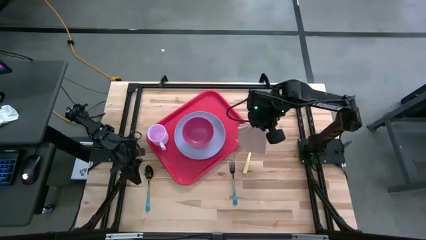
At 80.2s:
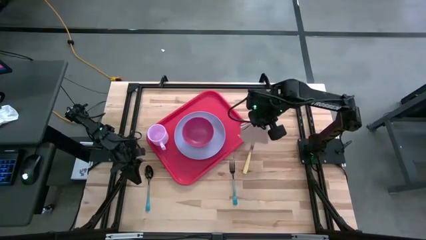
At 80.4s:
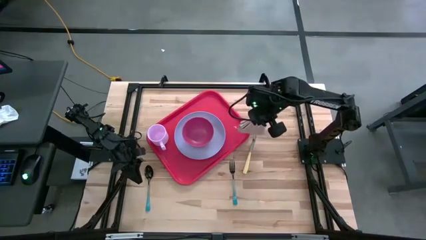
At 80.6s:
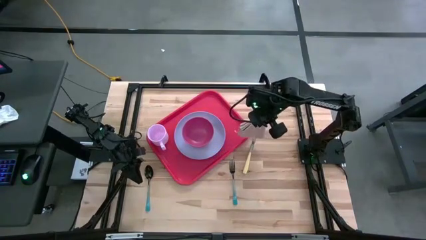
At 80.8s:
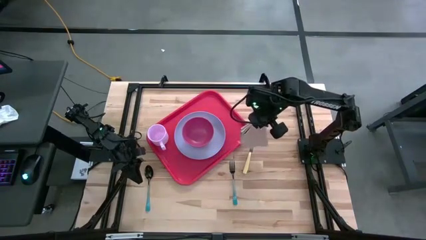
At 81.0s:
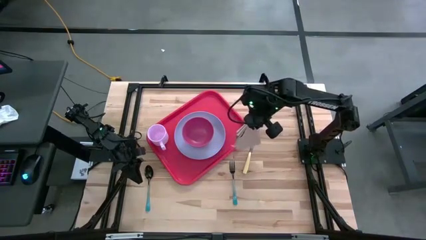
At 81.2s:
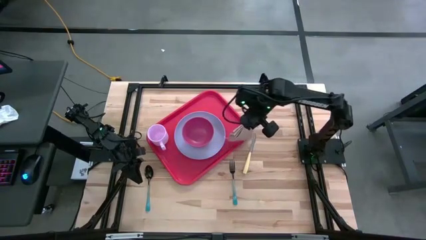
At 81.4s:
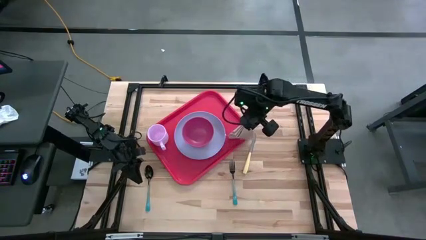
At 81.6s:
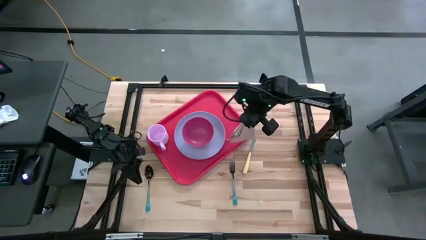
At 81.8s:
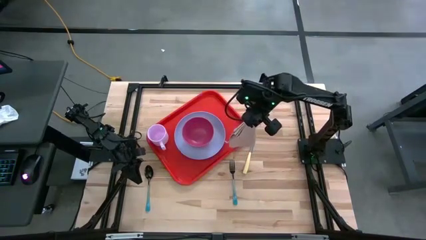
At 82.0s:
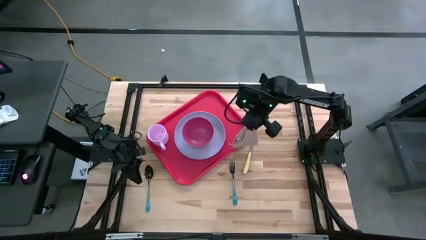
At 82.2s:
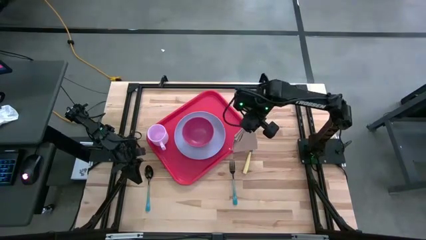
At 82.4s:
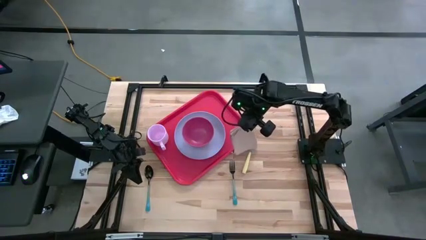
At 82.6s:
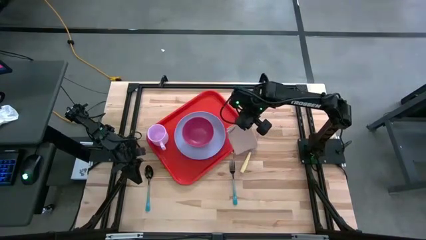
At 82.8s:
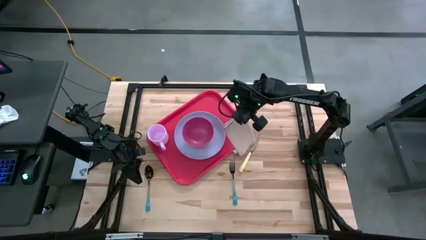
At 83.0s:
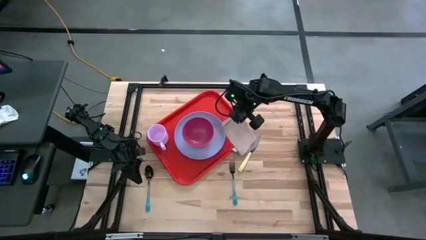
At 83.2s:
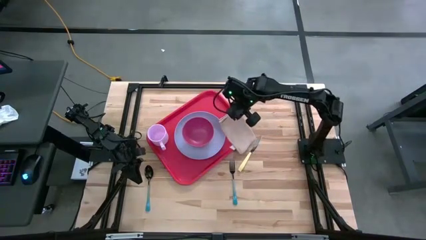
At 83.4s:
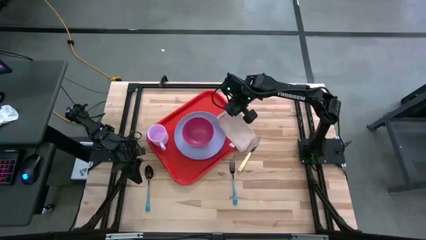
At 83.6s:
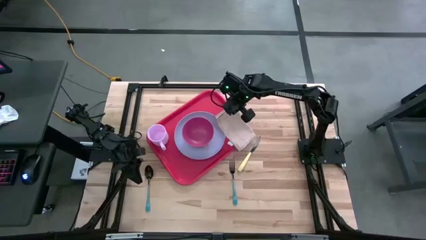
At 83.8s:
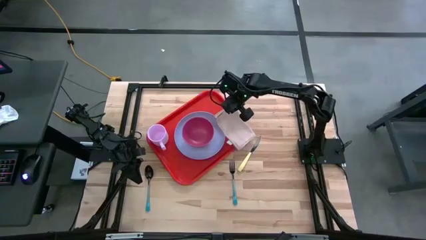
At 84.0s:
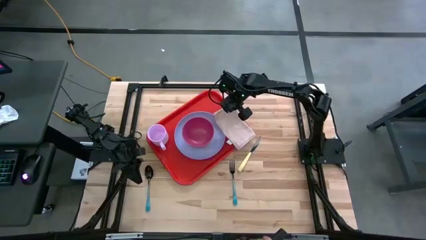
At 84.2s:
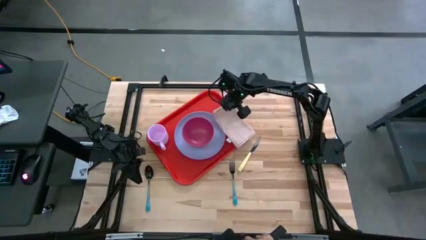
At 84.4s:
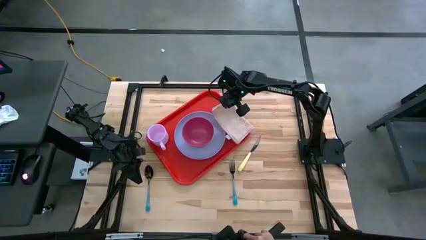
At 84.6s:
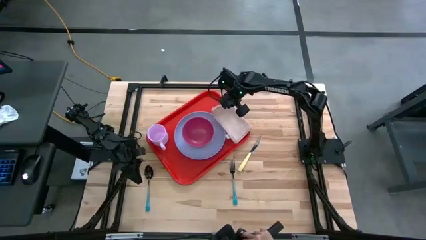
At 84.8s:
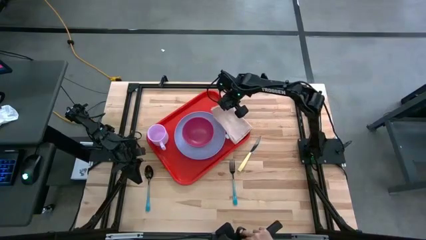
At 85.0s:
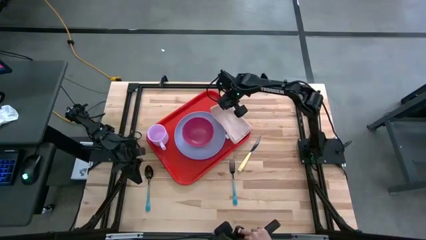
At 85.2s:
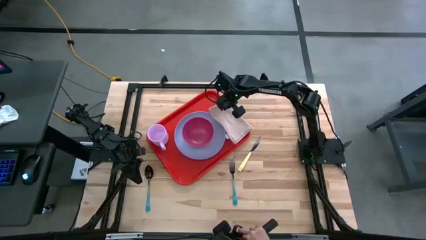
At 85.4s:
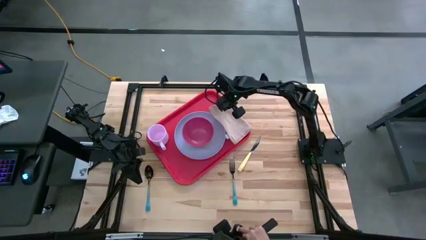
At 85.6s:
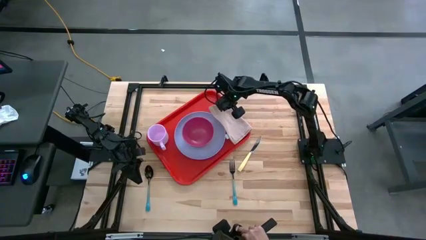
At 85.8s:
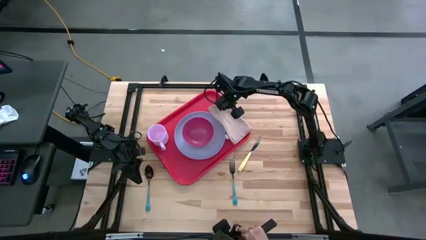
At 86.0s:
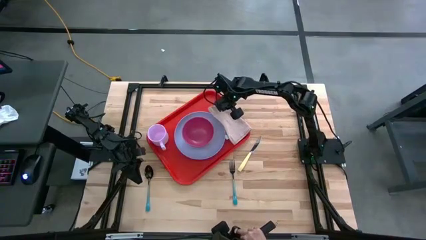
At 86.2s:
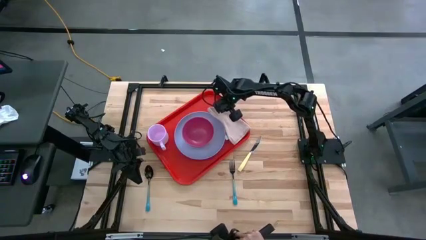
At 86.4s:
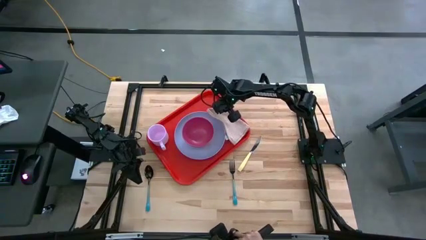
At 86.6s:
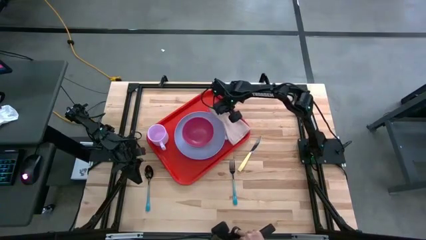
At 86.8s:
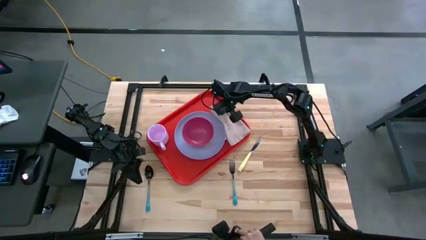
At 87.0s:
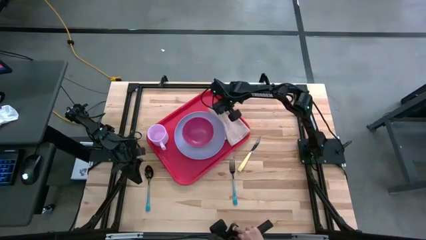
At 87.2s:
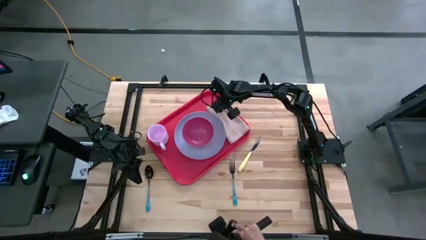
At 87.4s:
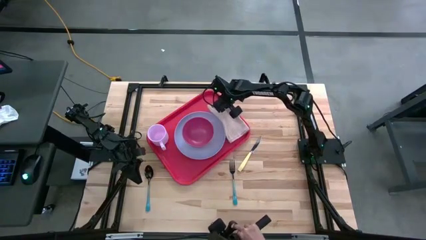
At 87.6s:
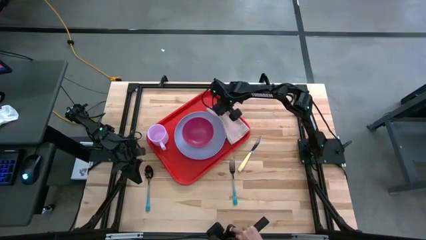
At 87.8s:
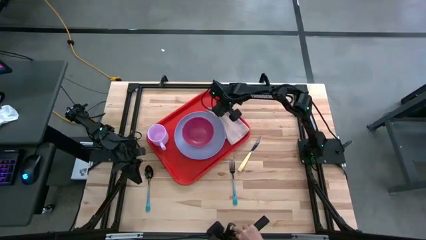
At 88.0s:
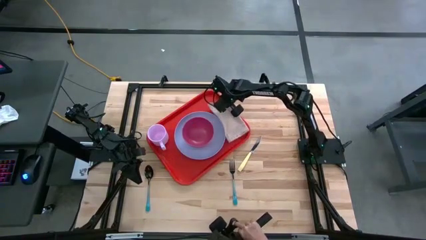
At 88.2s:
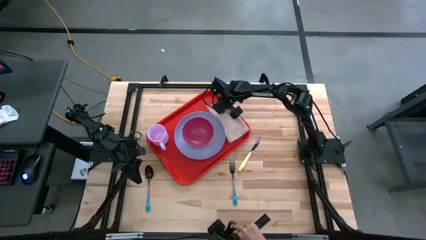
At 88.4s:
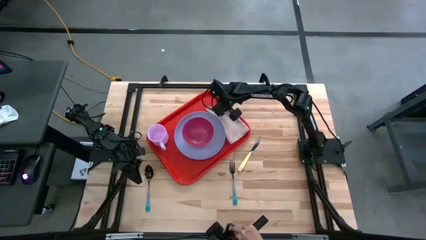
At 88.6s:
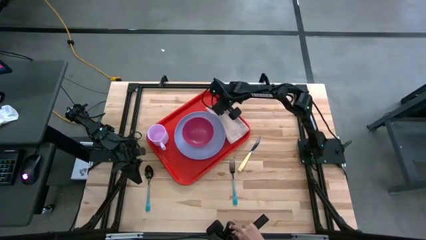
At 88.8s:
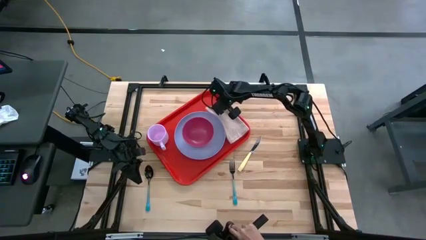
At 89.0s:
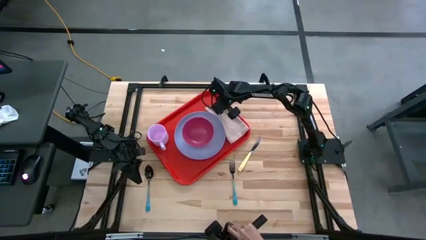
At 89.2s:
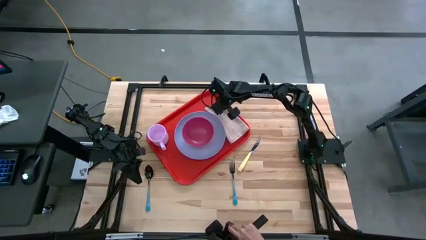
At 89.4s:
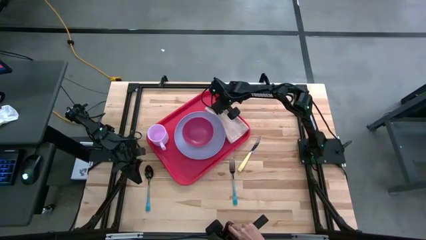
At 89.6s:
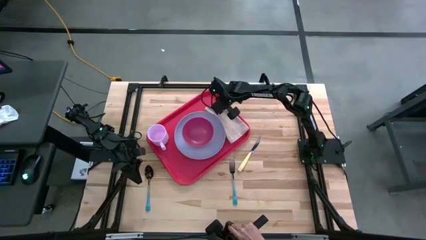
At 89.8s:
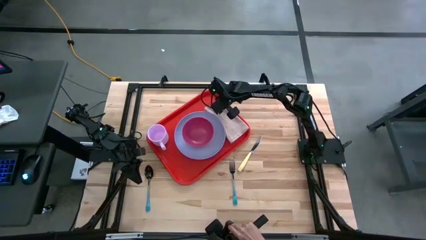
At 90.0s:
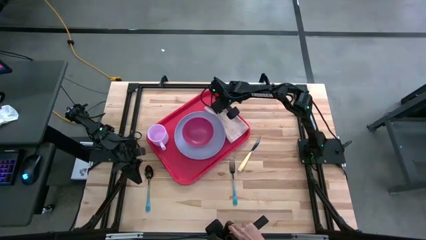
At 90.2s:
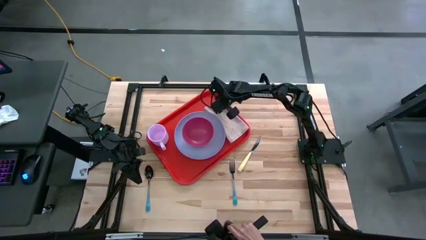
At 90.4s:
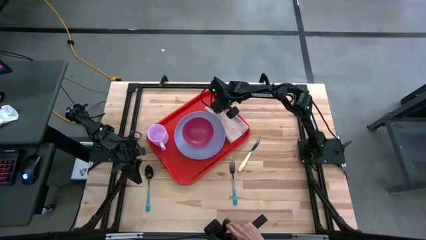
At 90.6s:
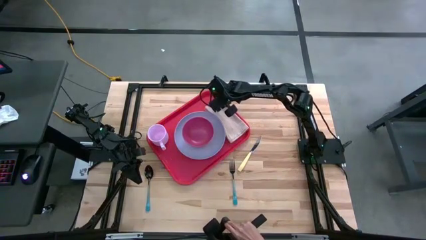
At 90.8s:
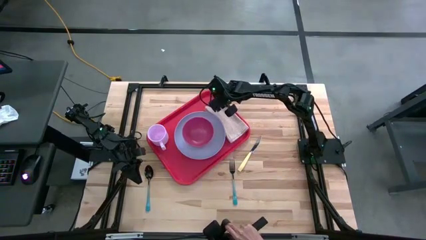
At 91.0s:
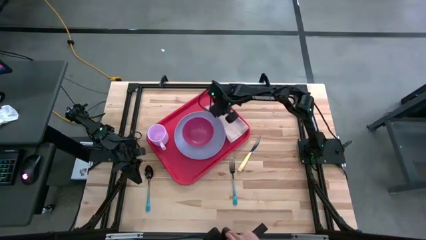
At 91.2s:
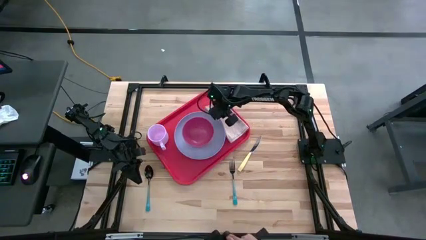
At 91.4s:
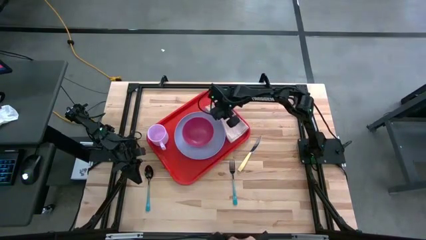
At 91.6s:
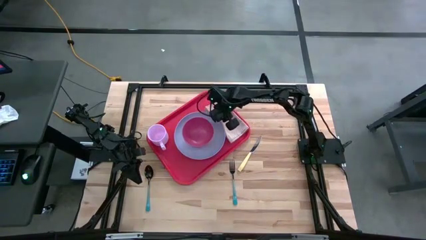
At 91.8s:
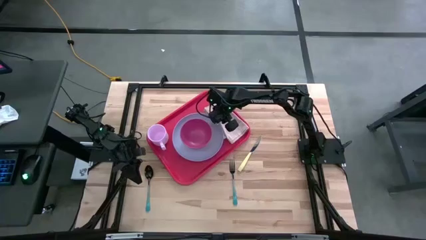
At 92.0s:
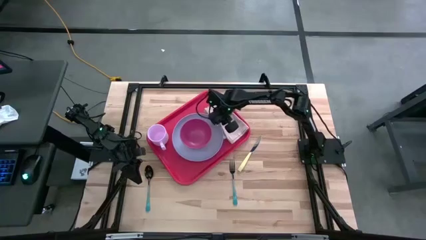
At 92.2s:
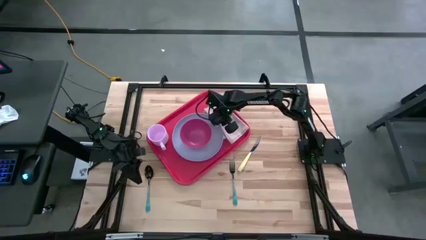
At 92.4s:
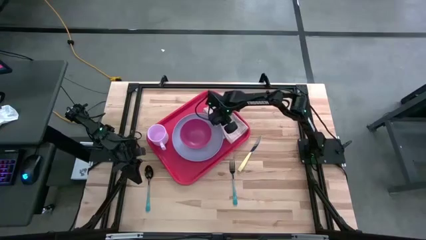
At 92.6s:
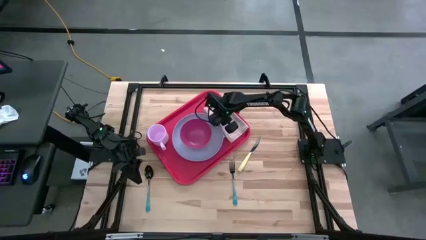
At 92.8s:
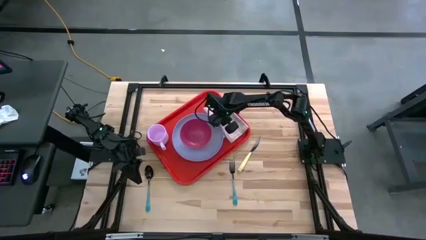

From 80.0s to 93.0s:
Task: Set up tray
Put the brown table napkin to the right of the white plate on the red serving tray

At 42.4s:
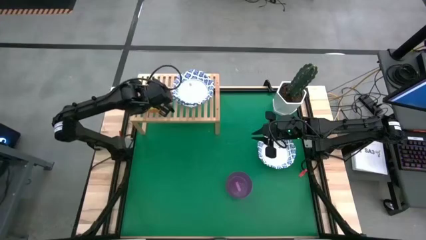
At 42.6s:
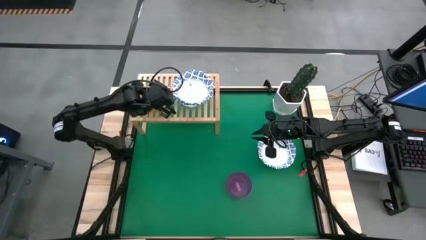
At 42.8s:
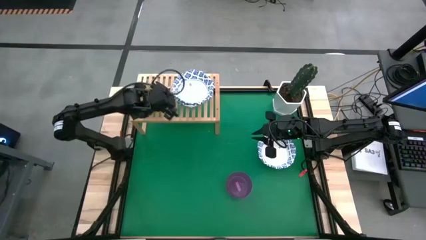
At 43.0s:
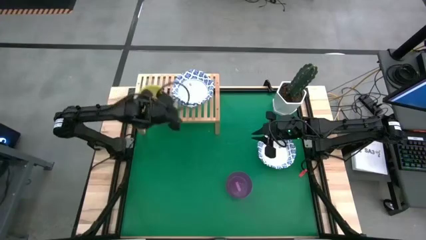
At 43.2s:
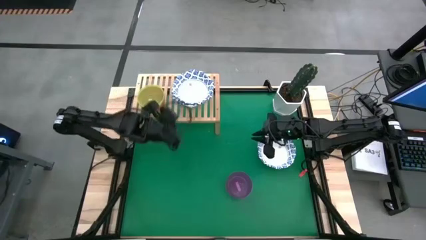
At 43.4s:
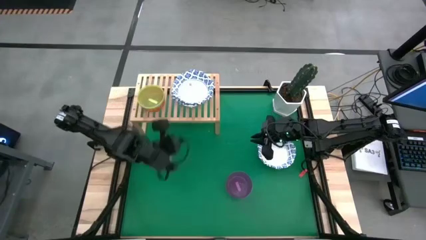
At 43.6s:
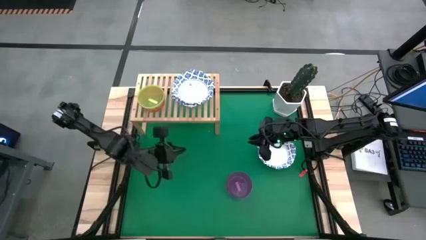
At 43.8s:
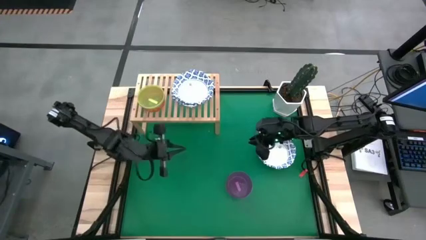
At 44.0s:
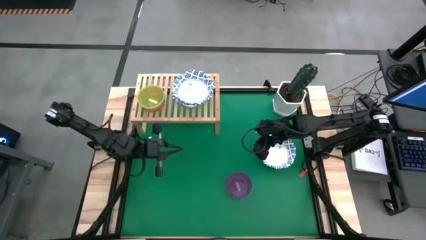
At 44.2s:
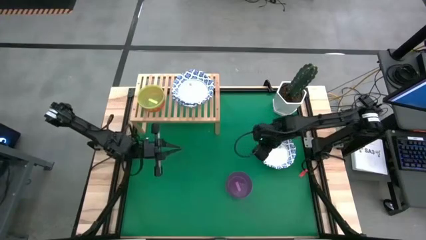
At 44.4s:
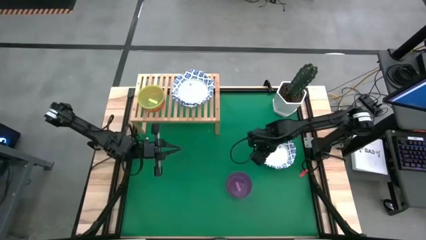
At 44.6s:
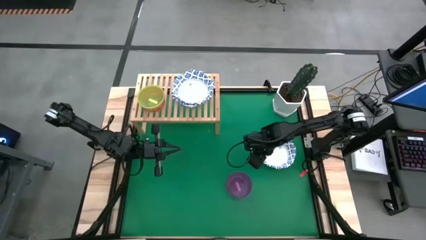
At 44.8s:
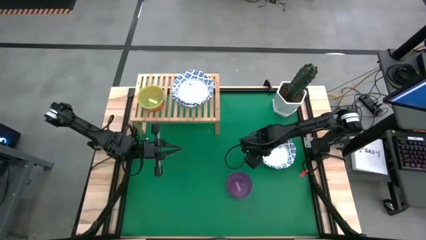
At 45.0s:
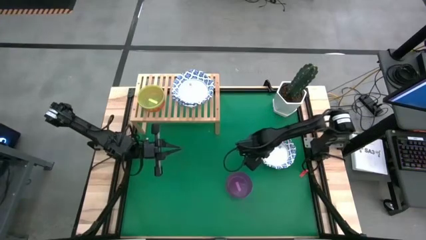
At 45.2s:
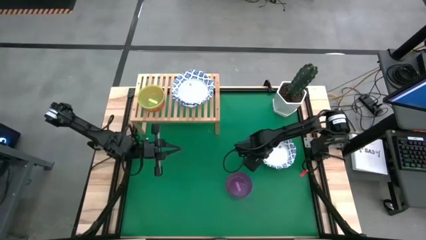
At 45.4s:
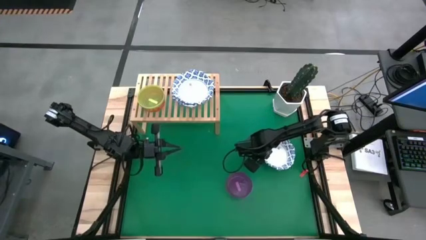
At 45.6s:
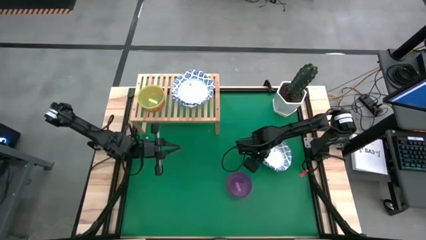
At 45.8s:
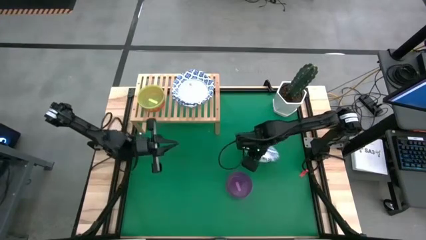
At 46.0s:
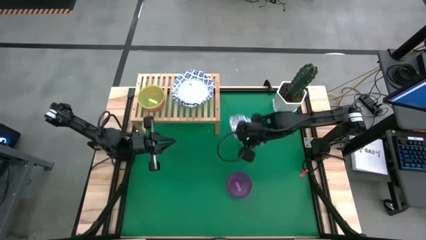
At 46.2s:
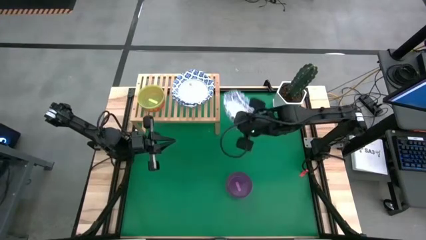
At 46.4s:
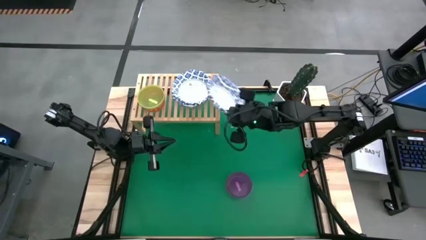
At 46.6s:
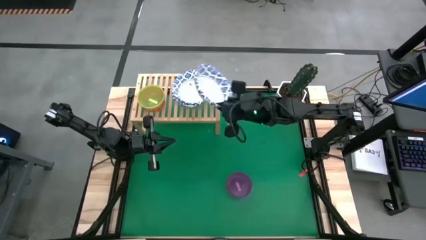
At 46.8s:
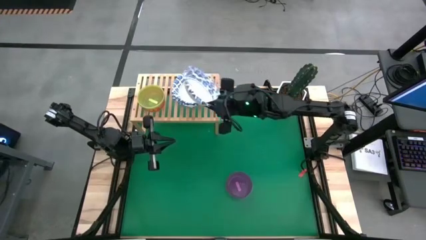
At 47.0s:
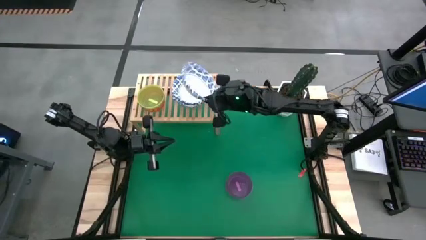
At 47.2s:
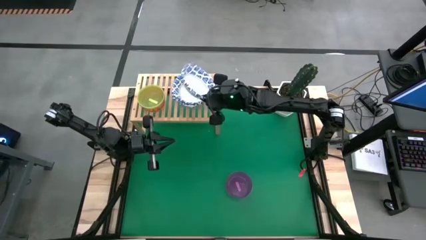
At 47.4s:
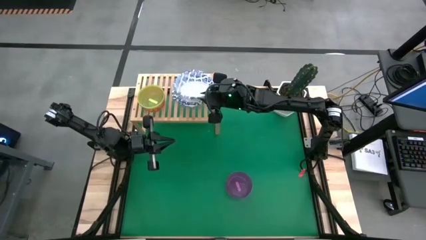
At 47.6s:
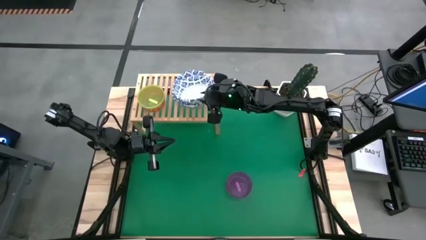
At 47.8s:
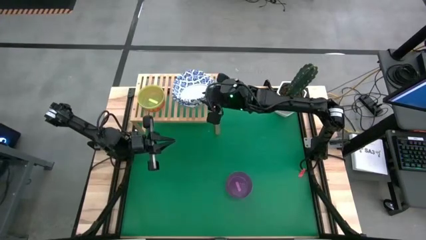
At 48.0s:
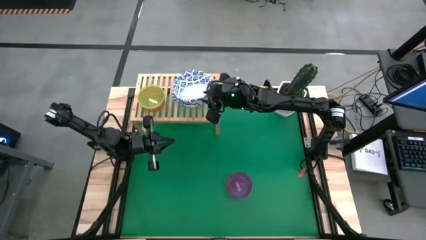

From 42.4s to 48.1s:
Task: Place and stack bowls onto a shelf
Stack the blue patterned bowl on top of another blue patterned bowl on the shelf
